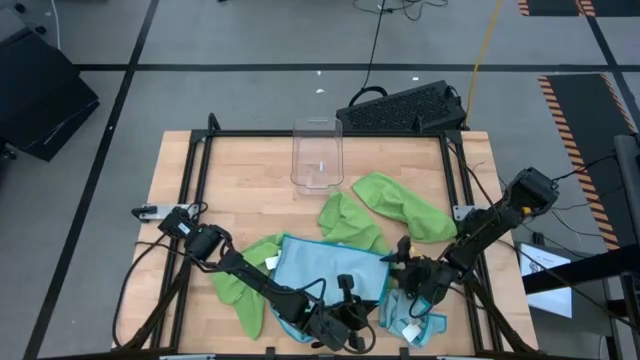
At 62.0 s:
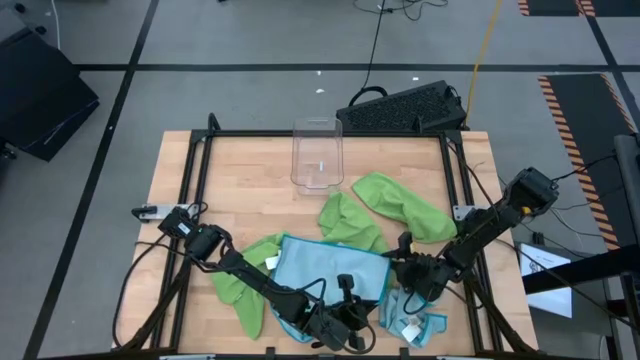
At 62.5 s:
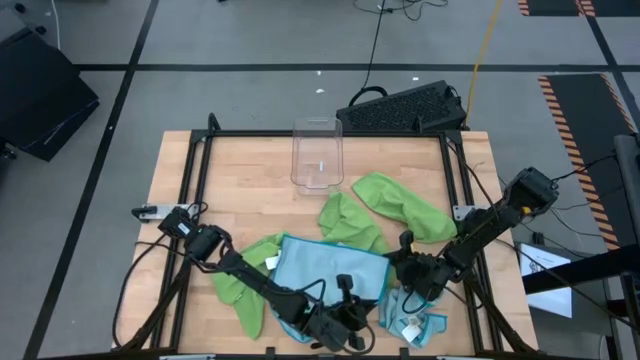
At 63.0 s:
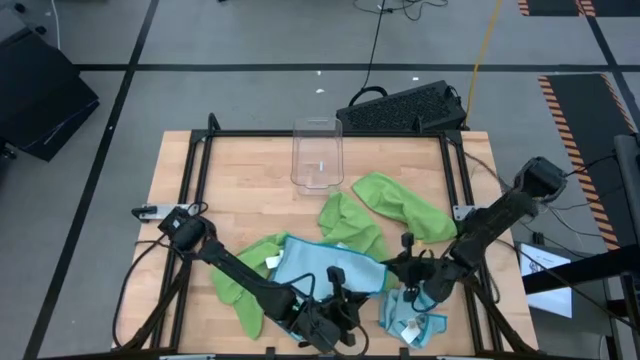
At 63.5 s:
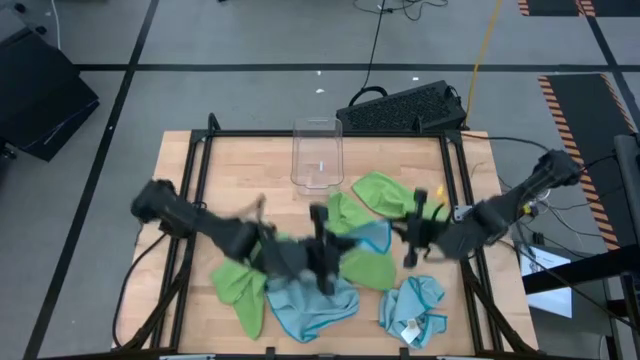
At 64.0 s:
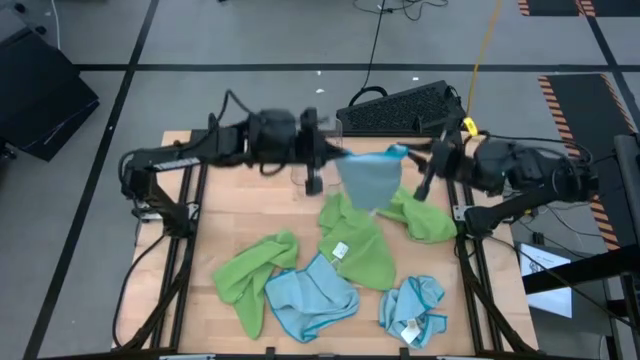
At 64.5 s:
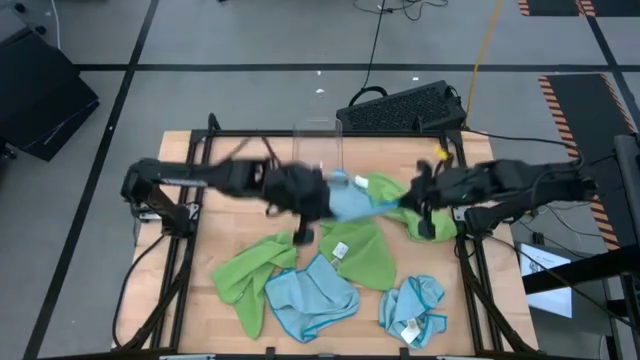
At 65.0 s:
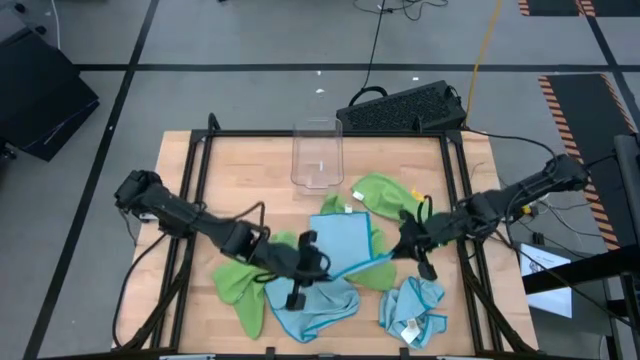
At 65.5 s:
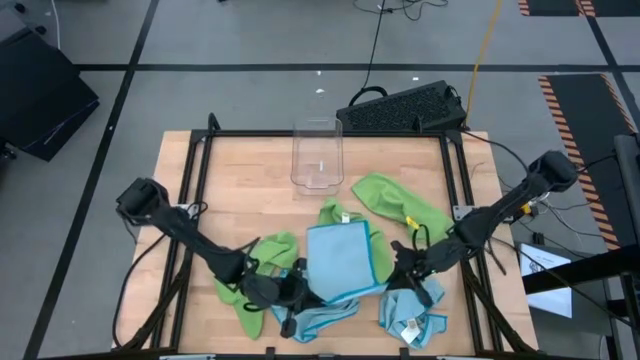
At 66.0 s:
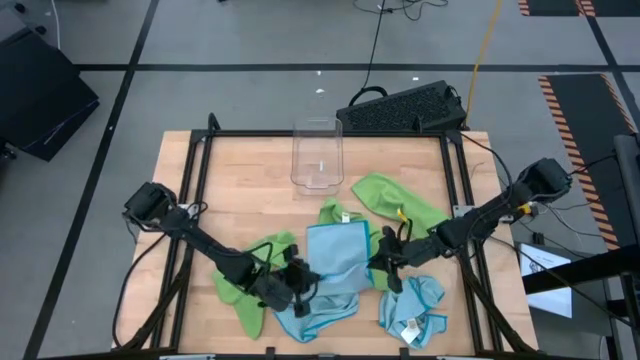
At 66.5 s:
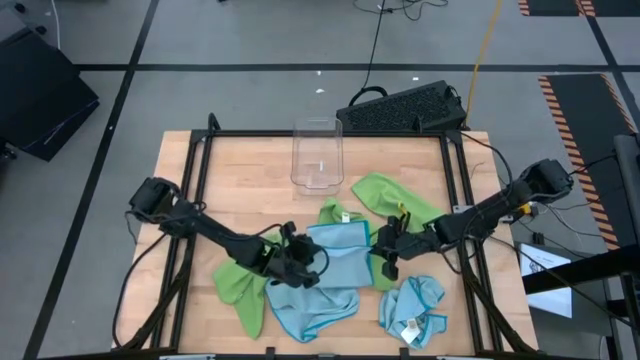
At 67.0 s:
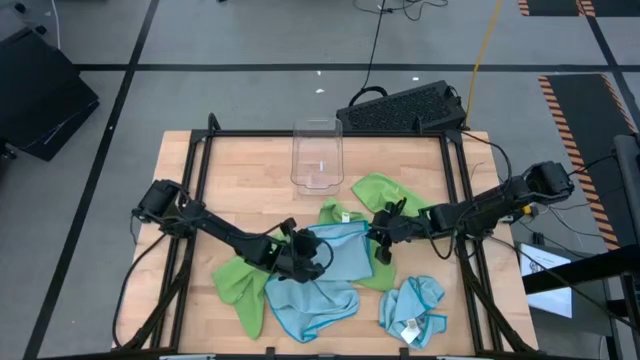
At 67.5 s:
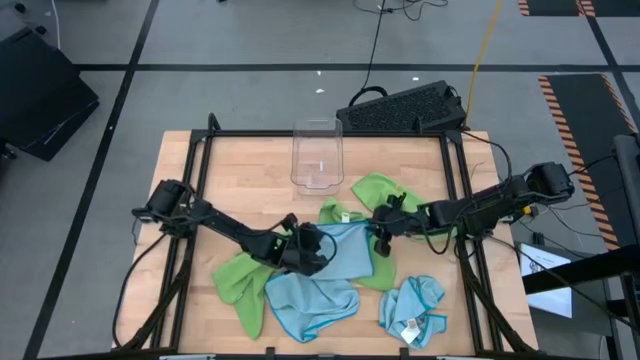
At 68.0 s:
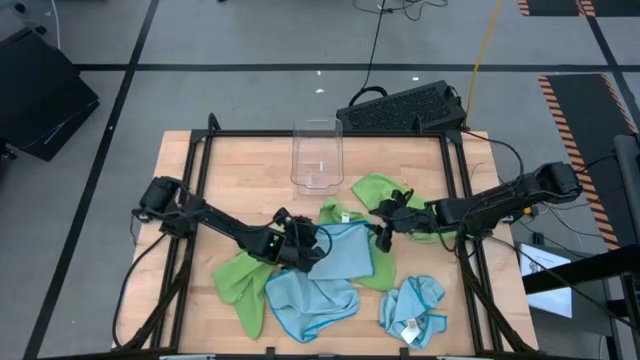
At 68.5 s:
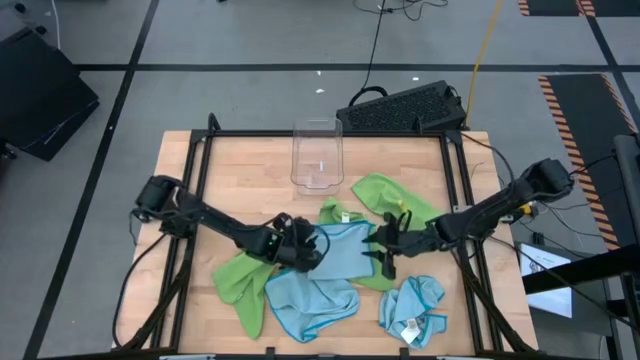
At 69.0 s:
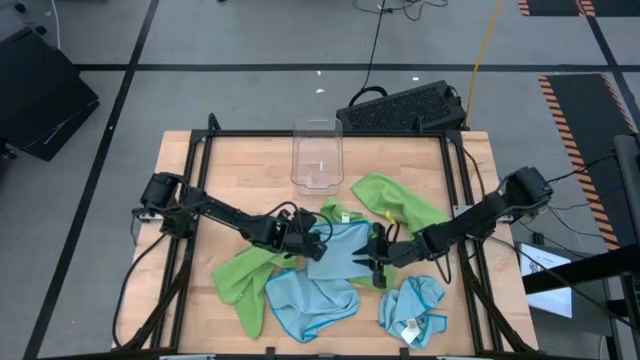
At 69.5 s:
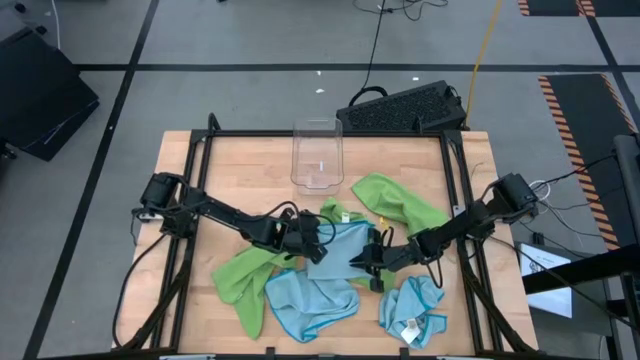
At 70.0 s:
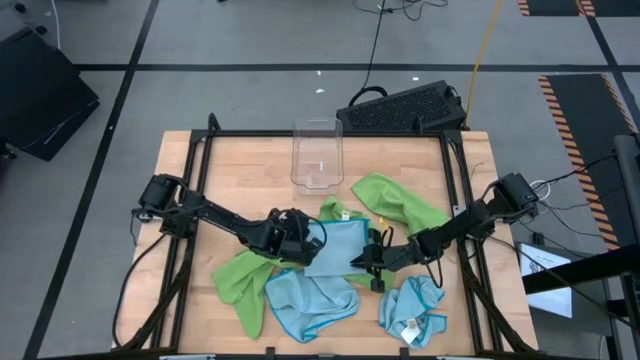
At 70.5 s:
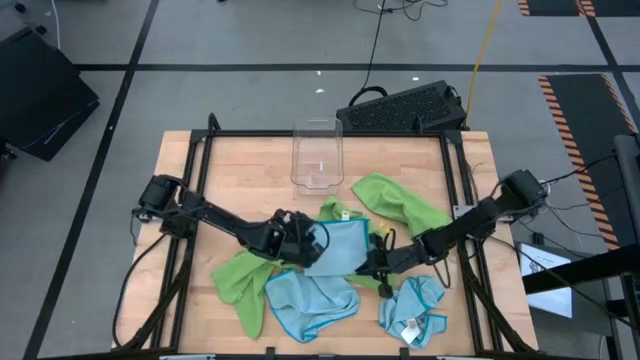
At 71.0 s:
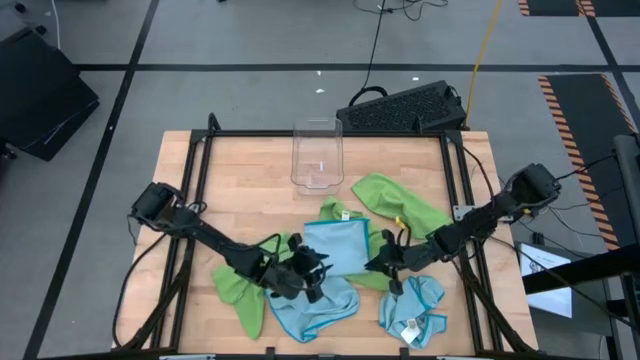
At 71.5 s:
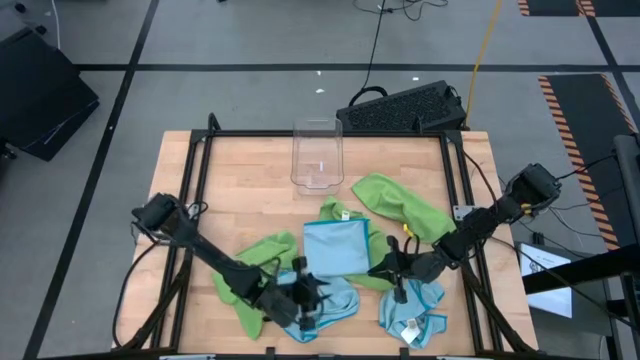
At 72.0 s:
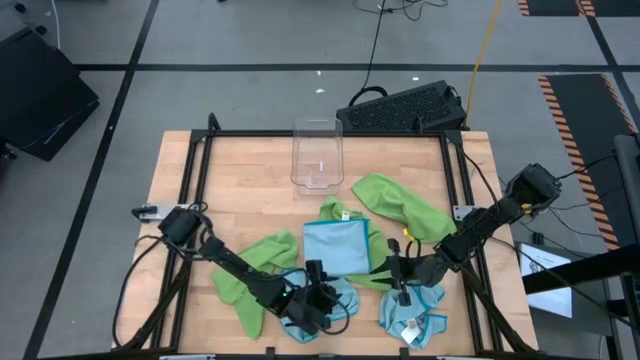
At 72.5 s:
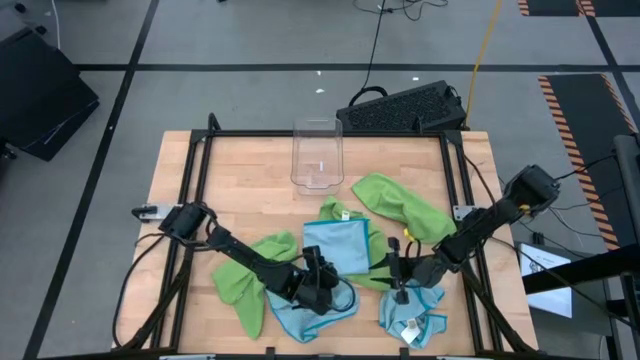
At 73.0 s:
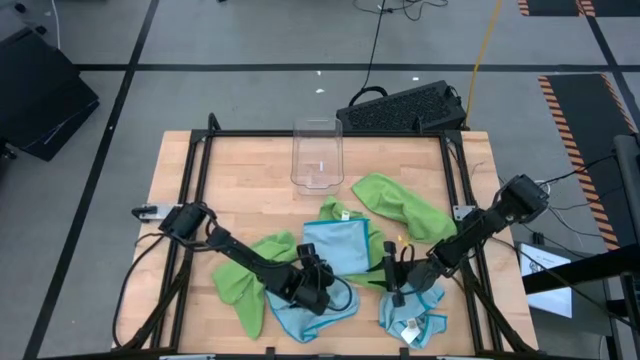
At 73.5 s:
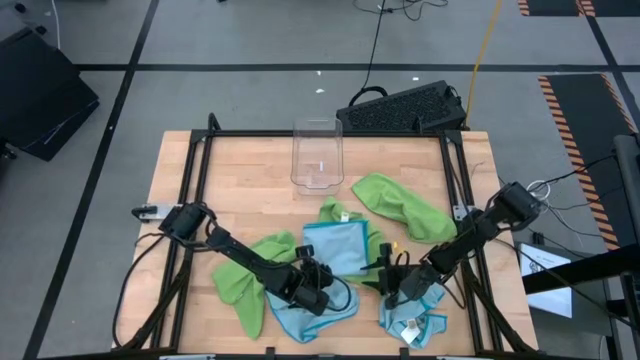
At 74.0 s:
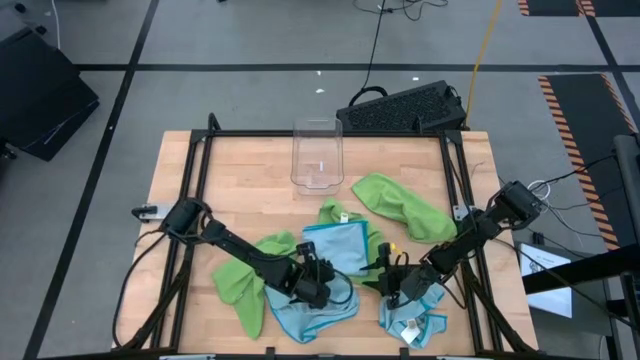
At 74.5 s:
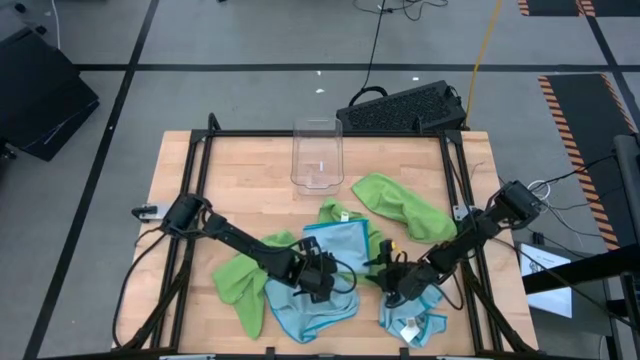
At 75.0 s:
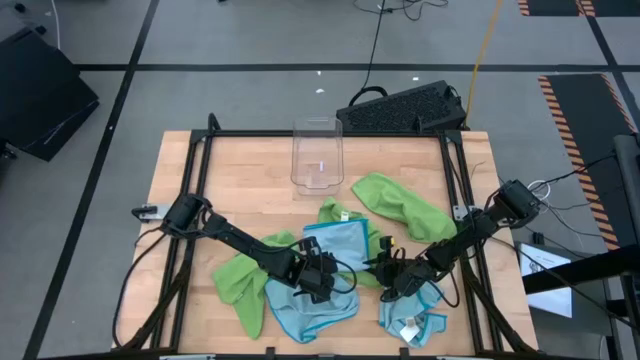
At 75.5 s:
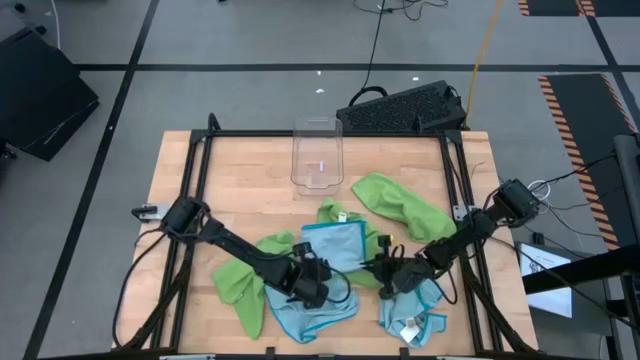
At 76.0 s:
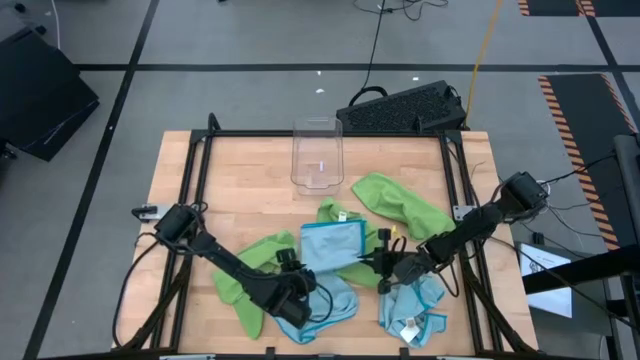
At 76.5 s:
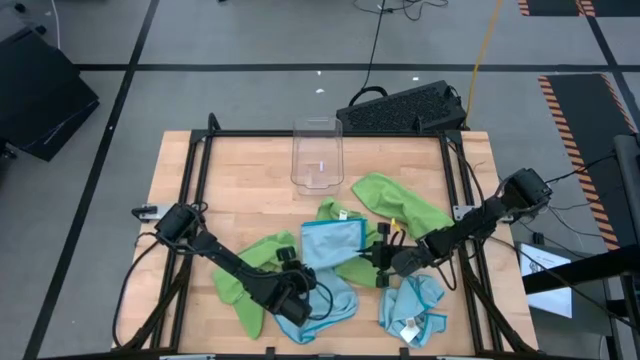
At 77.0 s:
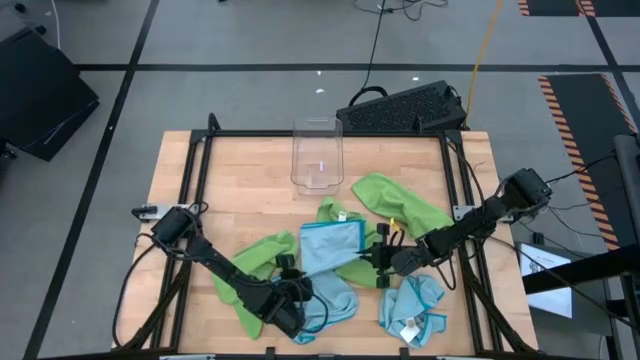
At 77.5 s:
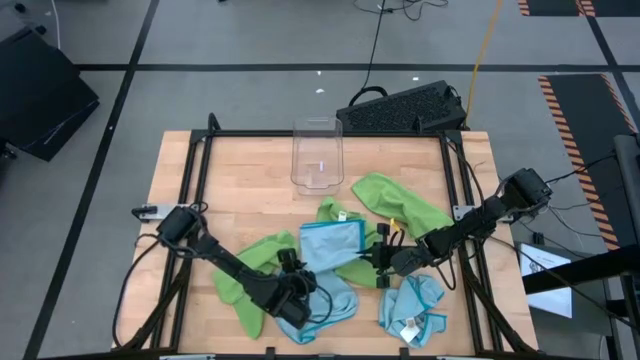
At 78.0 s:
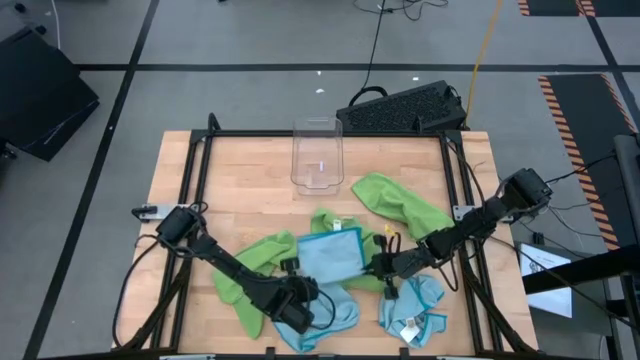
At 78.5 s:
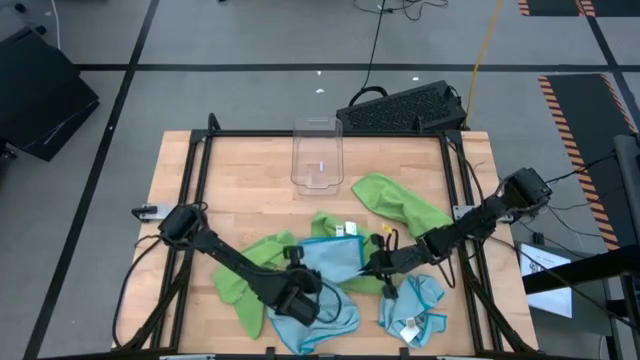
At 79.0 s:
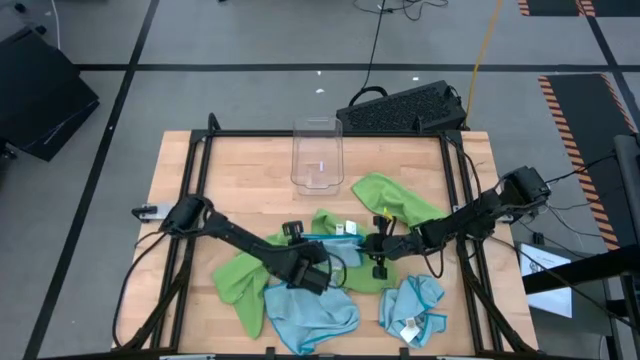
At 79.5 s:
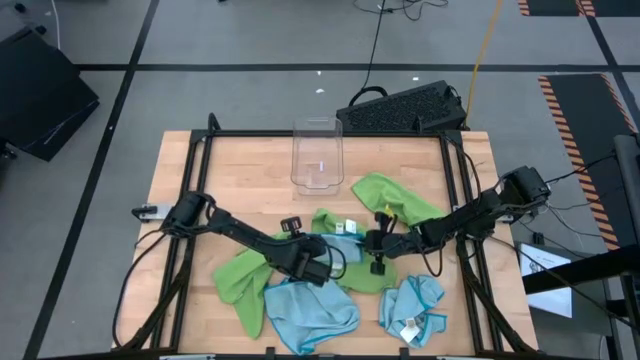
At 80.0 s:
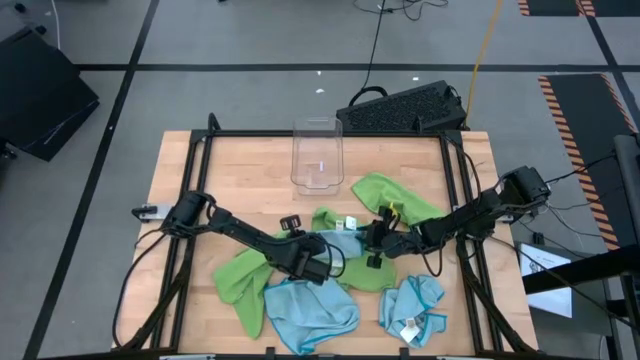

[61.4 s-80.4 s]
Task: Fold microfiber towels
Fold the top left blue towel
